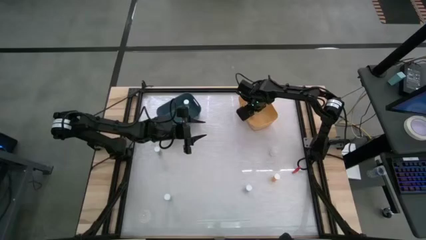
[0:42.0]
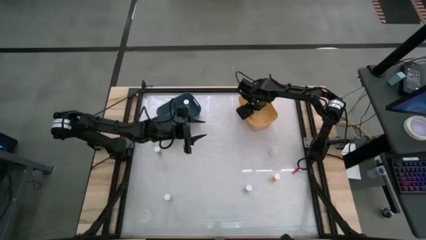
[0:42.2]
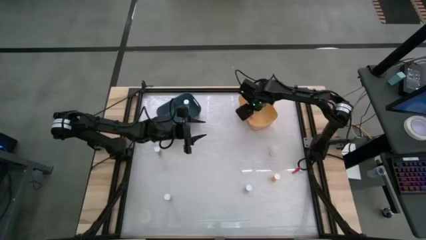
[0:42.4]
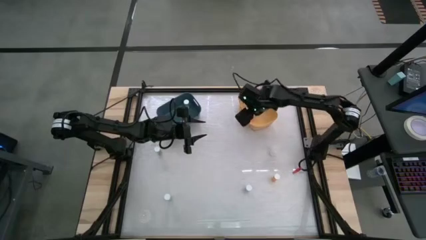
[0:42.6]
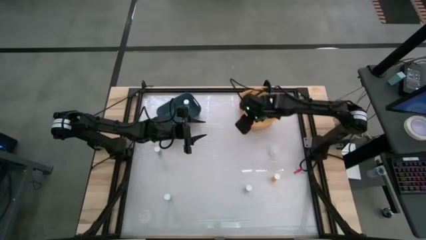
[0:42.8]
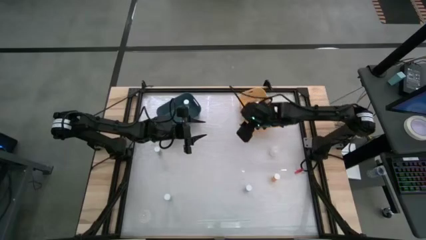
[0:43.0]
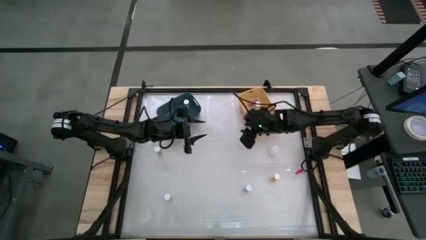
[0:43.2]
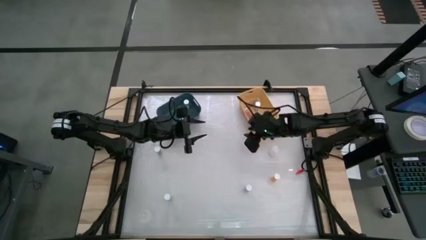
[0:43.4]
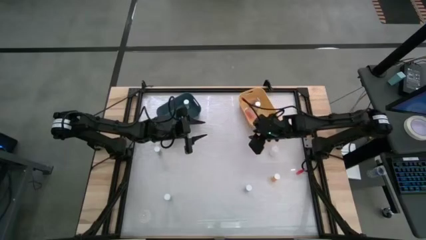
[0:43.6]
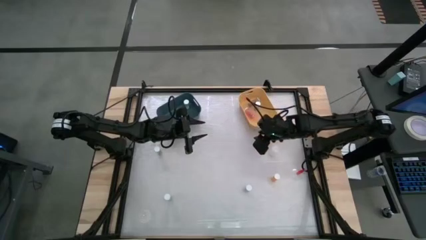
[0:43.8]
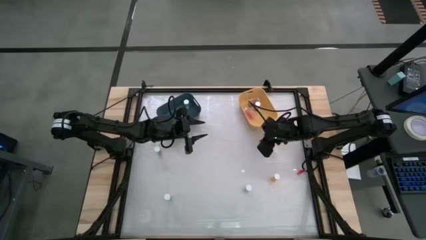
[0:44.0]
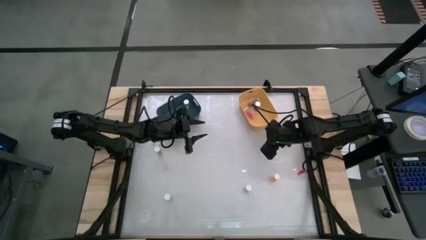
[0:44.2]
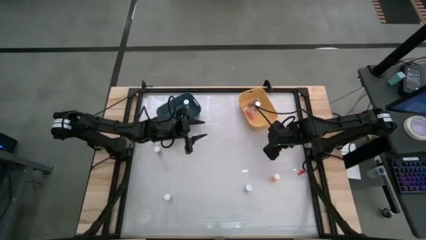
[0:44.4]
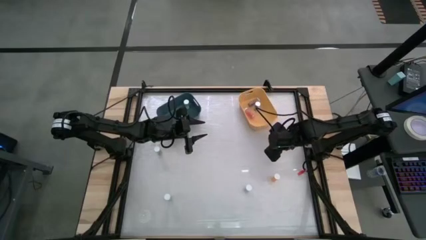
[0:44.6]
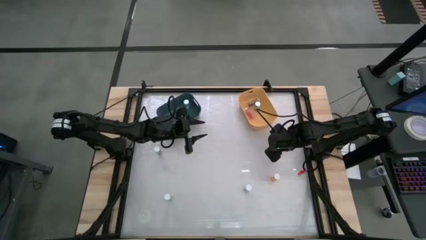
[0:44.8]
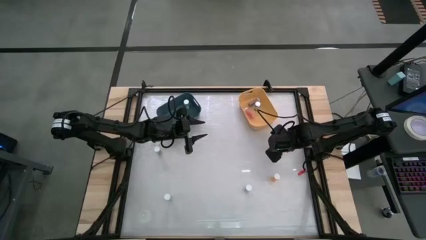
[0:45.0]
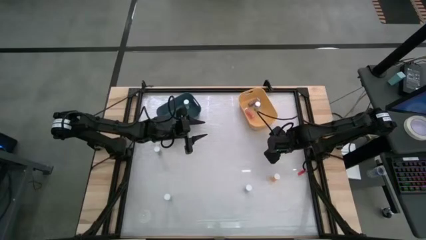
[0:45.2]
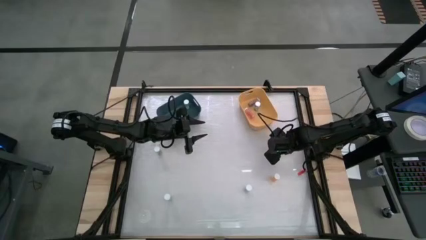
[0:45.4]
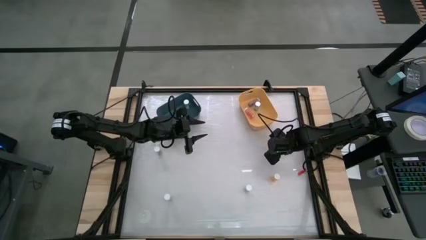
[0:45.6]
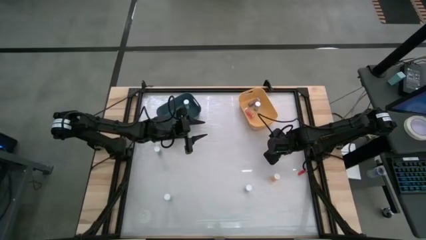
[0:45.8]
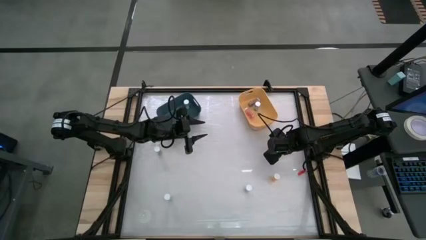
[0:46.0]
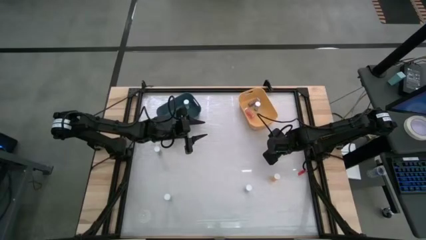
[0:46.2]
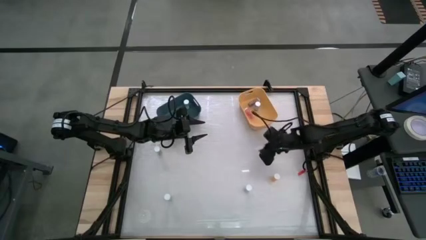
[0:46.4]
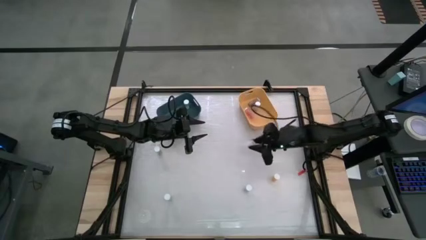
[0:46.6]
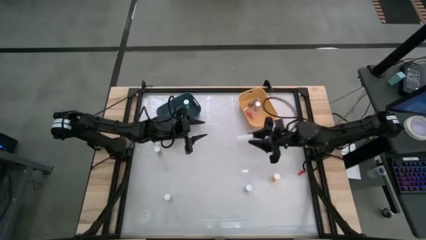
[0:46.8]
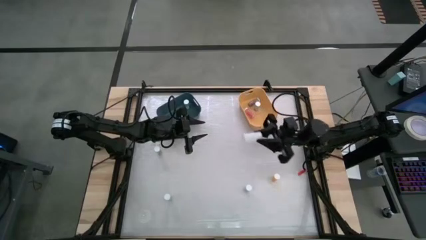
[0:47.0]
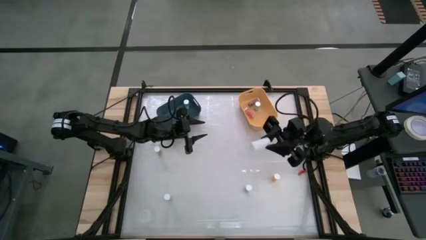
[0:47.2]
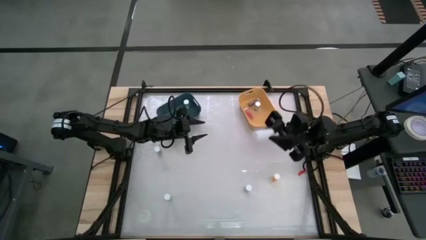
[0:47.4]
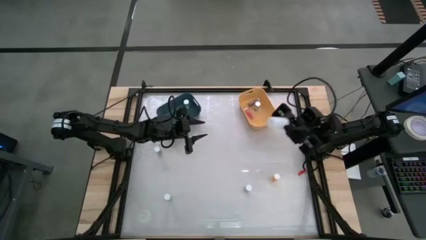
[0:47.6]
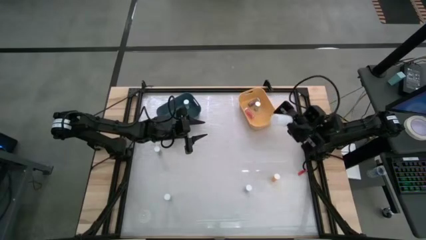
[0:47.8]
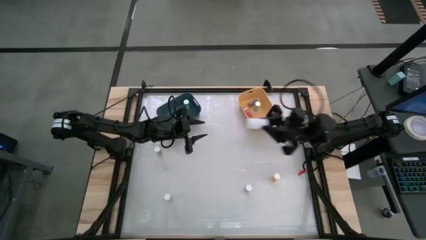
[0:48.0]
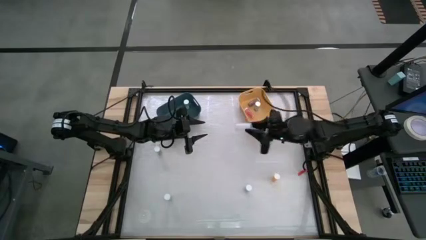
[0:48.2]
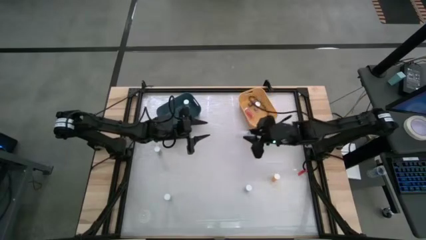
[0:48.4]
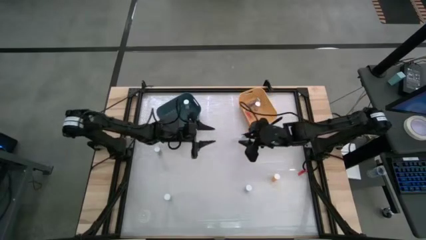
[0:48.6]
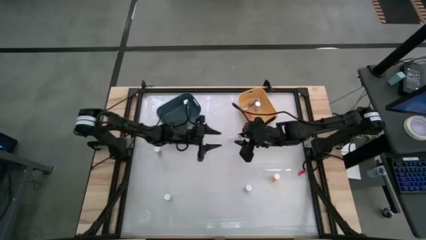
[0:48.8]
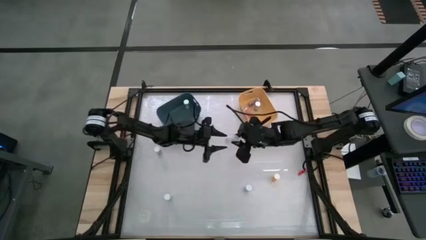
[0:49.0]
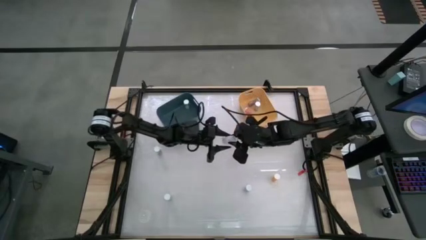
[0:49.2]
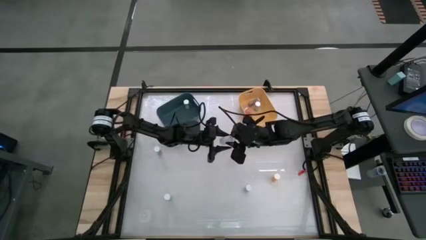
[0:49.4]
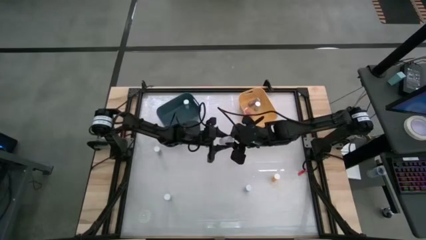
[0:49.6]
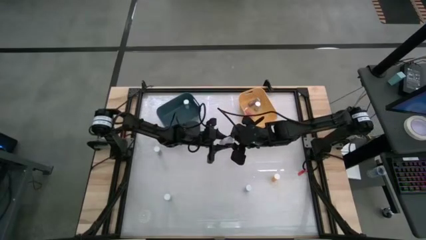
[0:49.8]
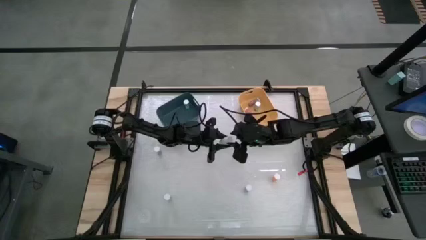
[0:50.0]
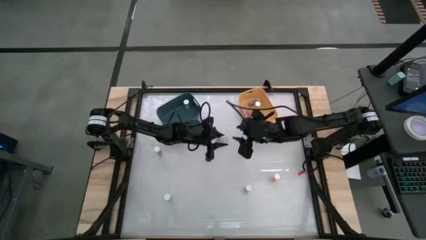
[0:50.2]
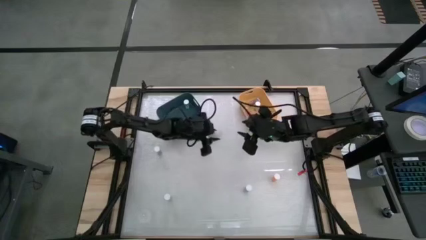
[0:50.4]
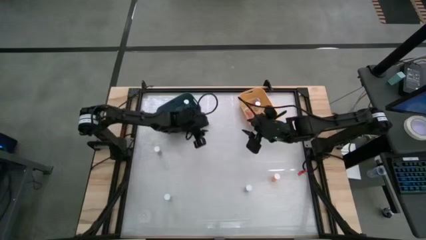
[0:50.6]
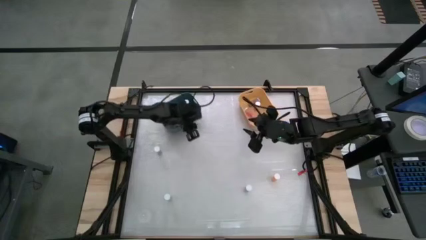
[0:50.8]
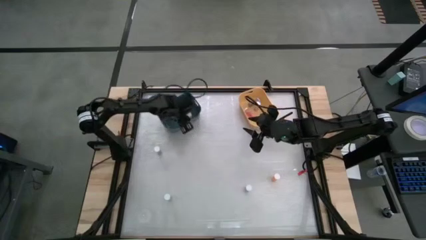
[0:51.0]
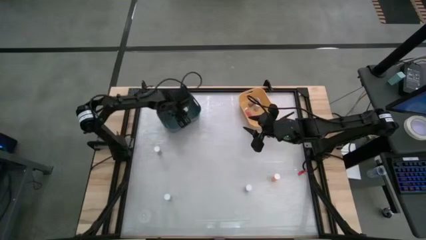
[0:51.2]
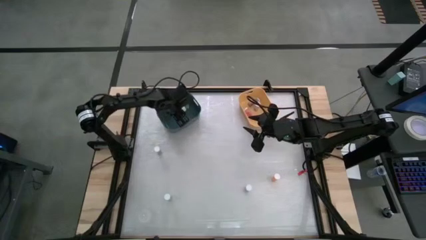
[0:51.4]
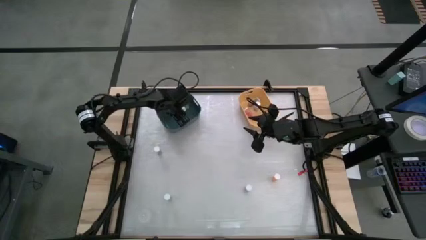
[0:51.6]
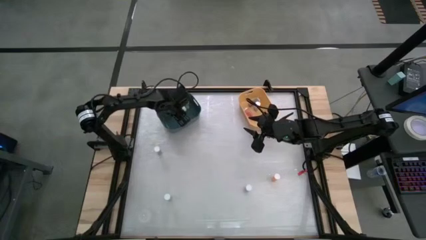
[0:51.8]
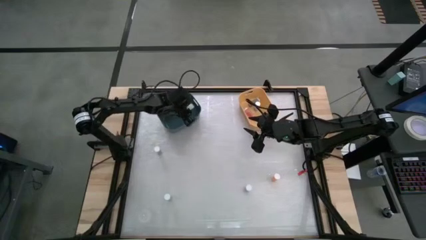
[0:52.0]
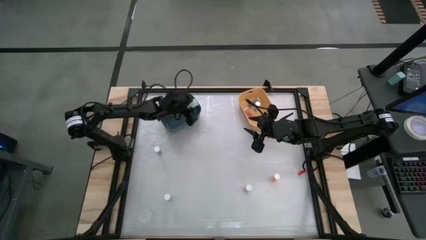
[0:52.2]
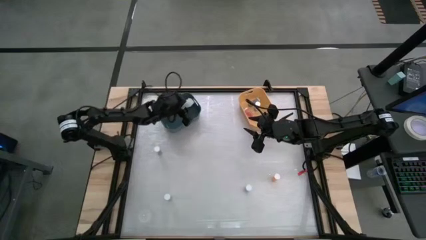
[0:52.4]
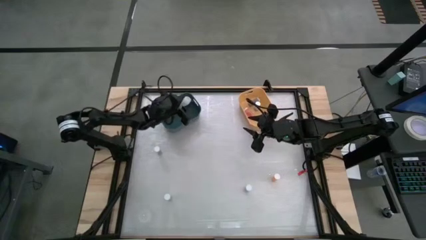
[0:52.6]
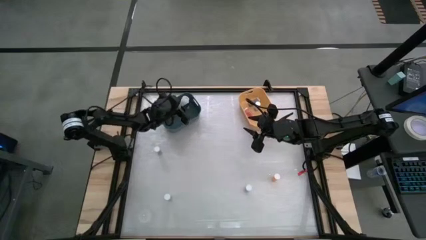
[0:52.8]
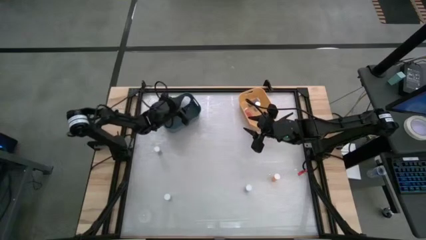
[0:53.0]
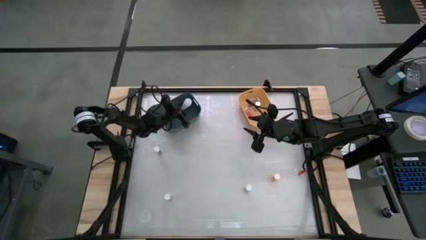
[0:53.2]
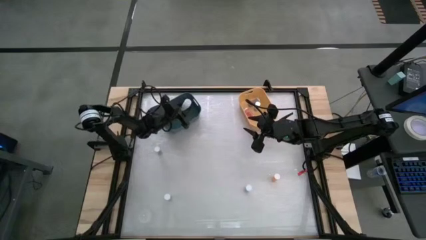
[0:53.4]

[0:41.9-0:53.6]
Task: Pick and place medicine bottles into bin by pill shape (circle, oval)
Put the transparent tablet bottle into the blue bin

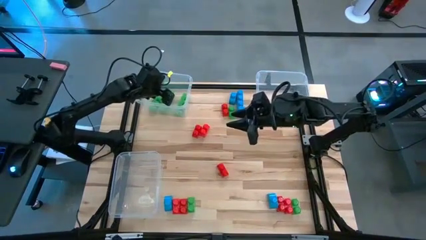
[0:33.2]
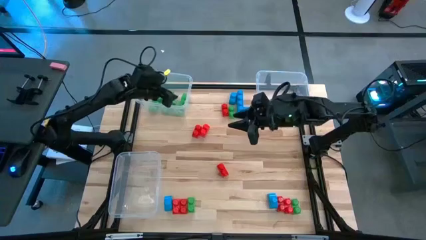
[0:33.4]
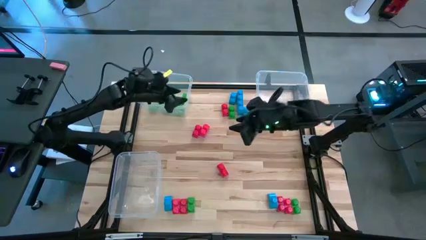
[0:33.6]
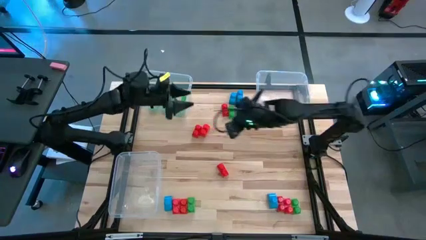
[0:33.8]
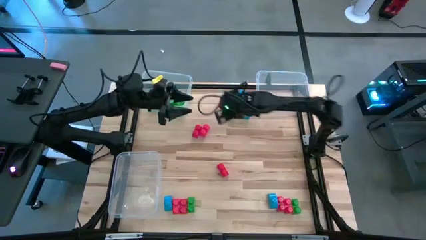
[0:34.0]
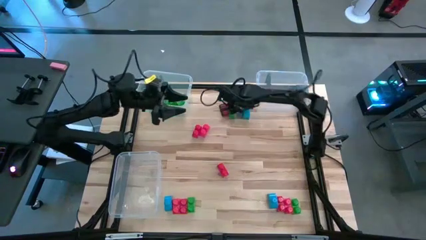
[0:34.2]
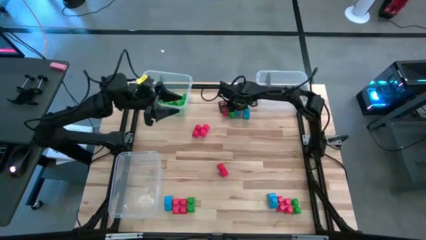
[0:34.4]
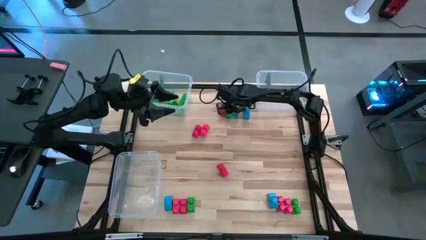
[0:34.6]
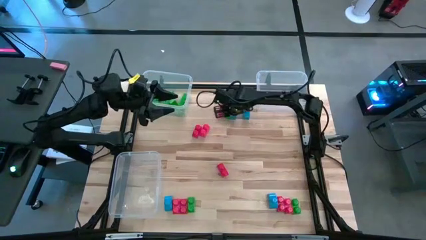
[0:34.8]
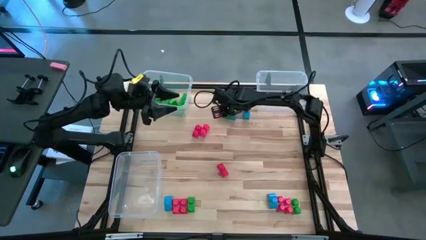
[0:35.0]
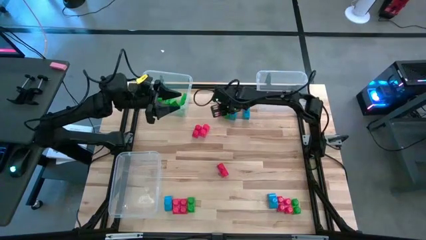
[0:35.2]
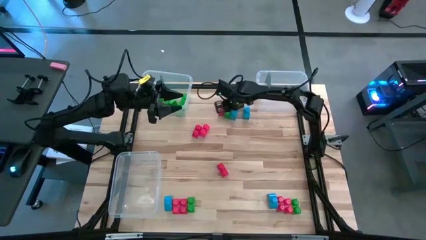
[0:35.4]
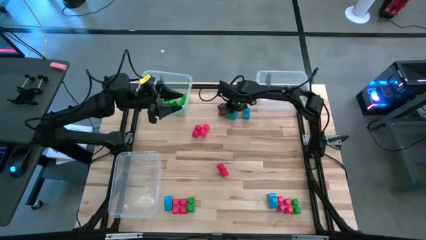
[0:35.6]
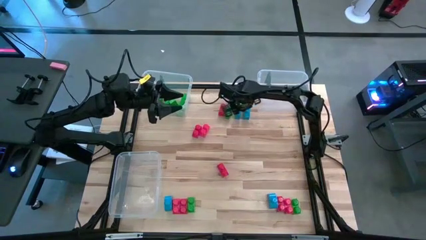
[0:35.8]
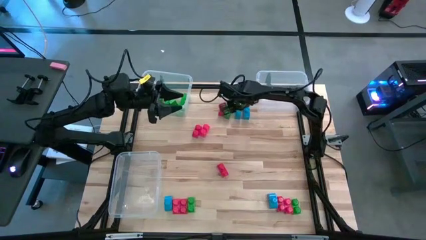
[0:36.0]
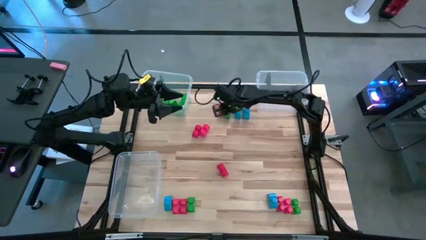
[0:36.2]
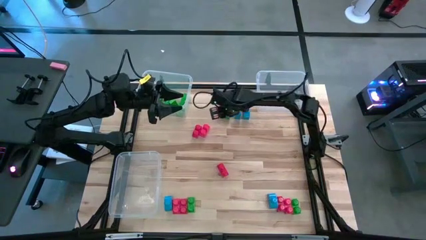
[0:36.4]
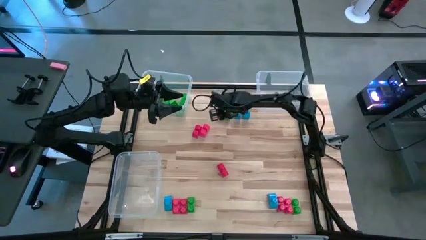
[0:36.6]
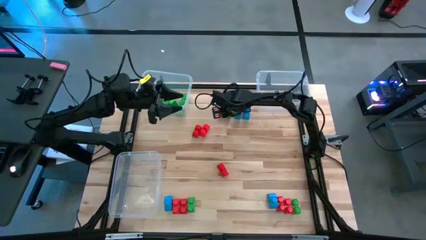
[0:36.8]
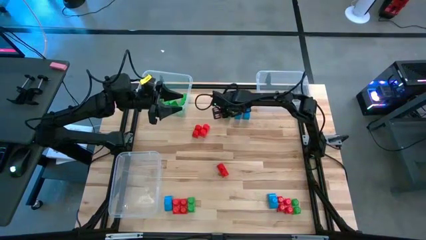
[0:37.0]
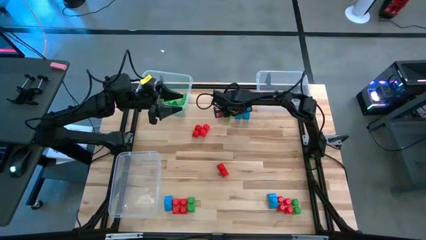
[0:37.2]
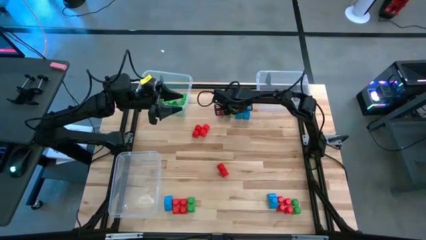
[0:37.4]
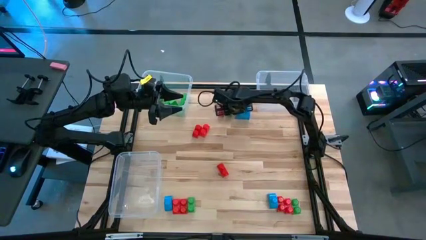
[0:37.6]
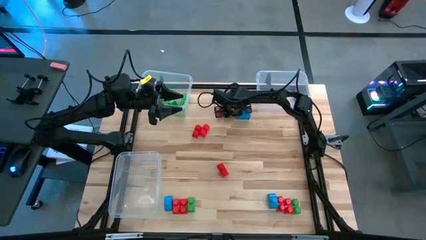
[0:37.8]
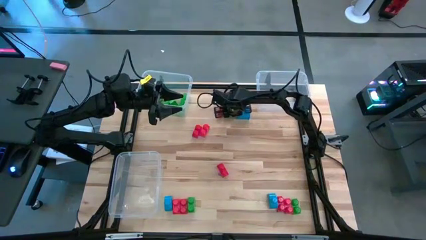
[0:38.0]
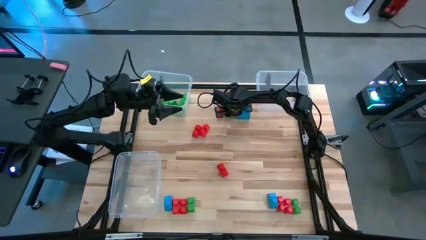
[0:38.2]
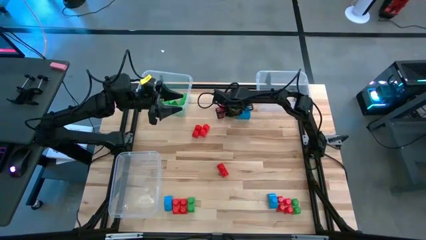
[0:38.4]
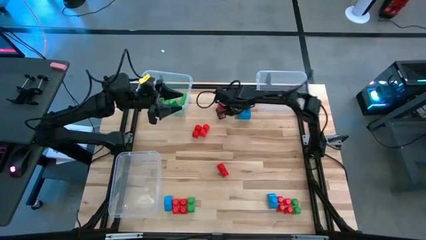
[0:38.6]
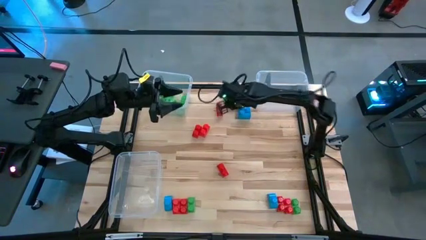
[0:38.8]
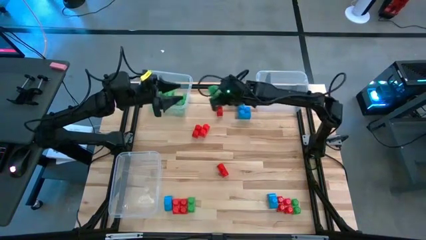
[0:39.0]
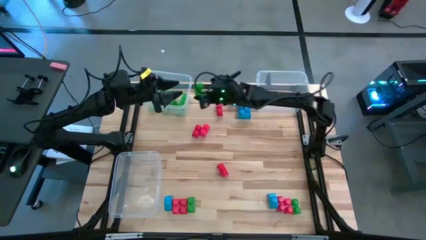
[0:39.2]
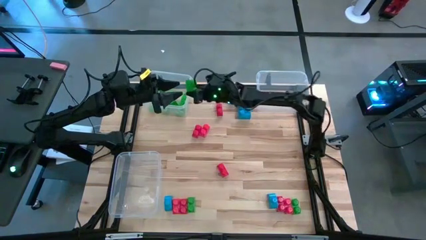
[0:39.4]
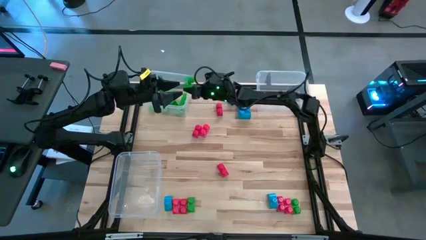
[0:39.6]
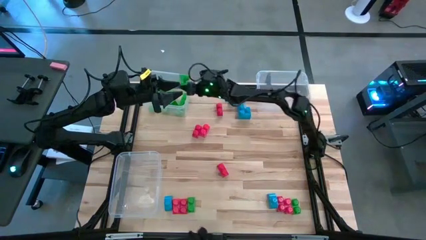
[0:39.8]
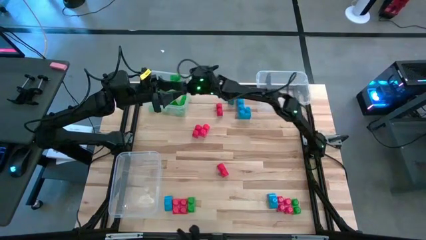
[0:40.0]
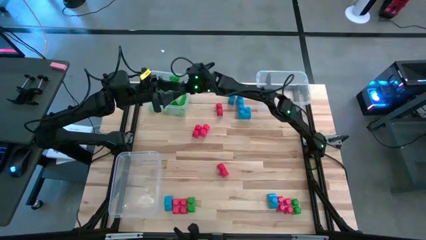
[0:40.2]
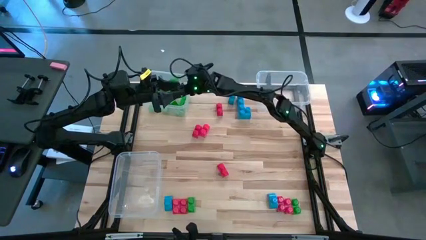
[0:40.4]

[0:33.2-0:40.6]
Task: Sort blocks
Put the green game piece into the top left transparent bin
